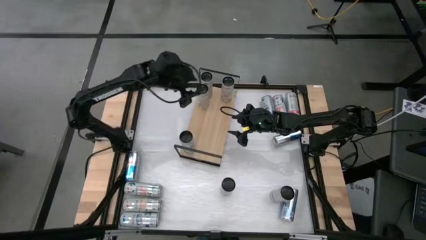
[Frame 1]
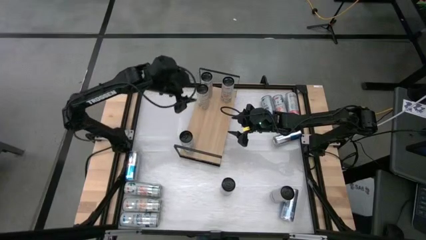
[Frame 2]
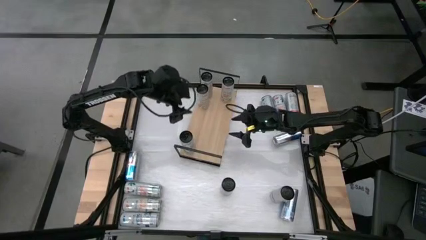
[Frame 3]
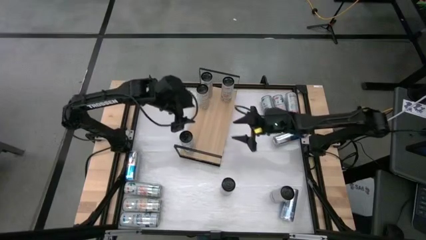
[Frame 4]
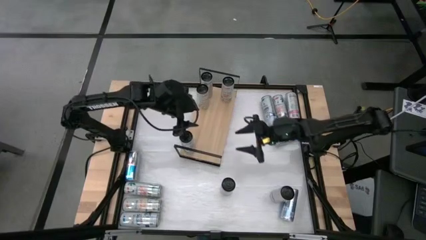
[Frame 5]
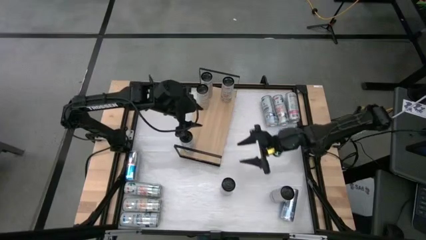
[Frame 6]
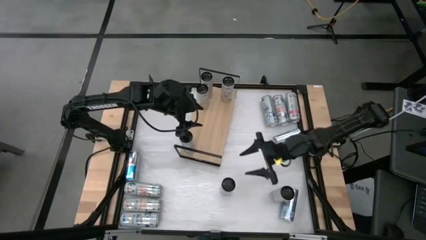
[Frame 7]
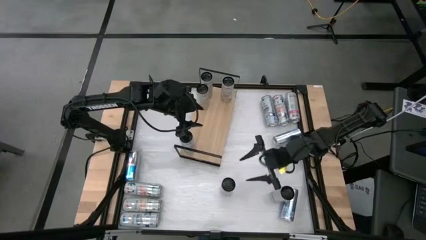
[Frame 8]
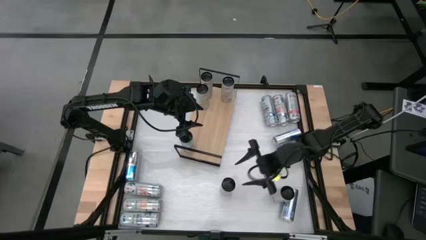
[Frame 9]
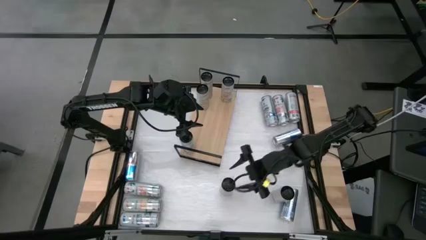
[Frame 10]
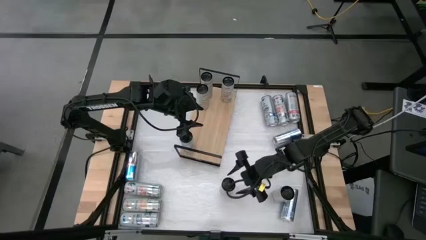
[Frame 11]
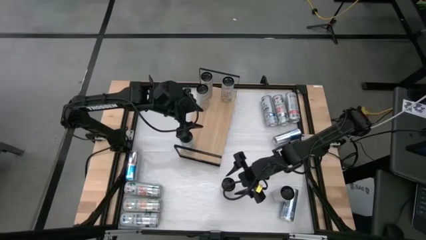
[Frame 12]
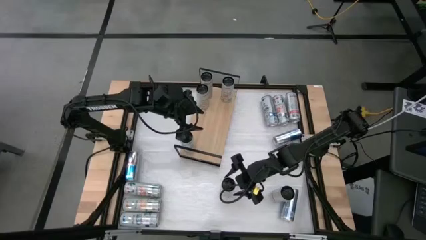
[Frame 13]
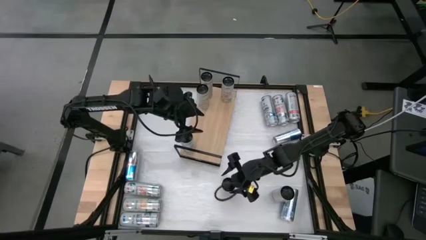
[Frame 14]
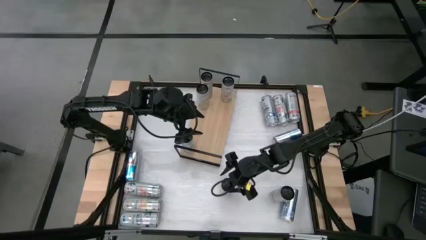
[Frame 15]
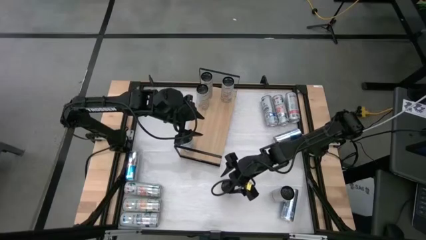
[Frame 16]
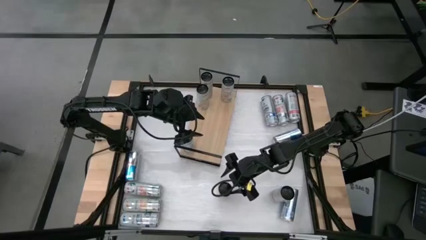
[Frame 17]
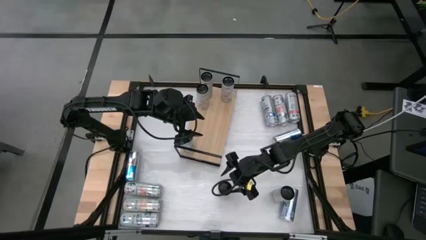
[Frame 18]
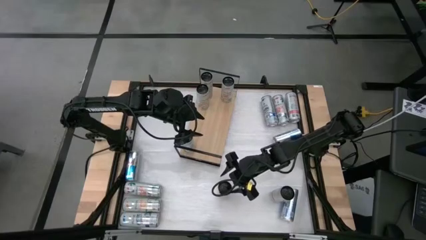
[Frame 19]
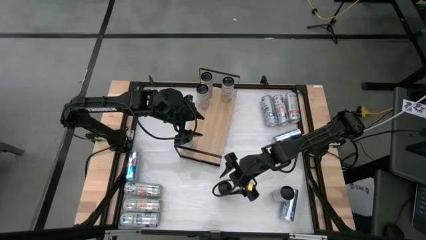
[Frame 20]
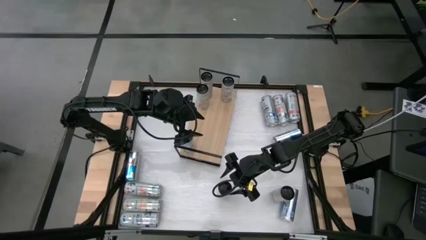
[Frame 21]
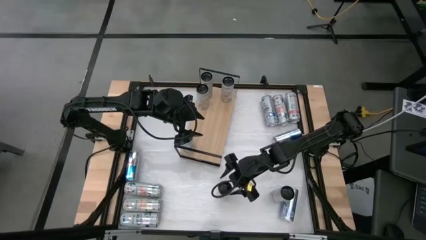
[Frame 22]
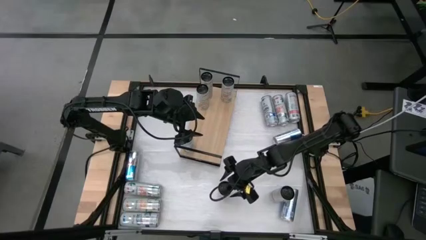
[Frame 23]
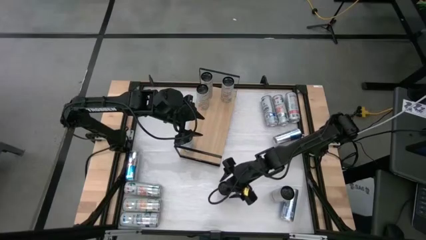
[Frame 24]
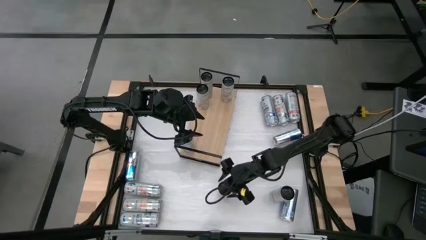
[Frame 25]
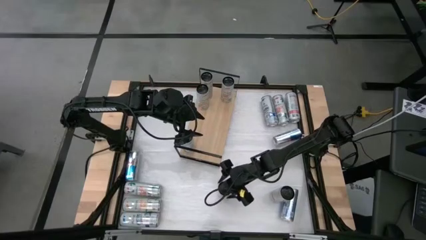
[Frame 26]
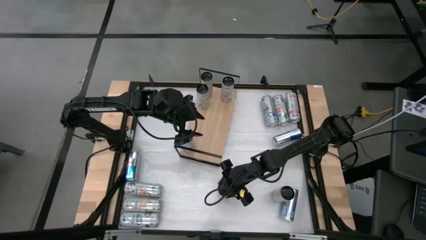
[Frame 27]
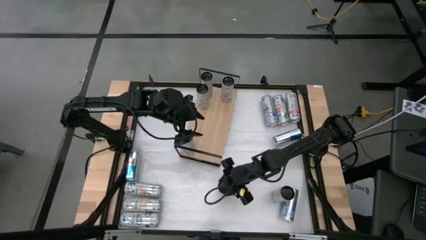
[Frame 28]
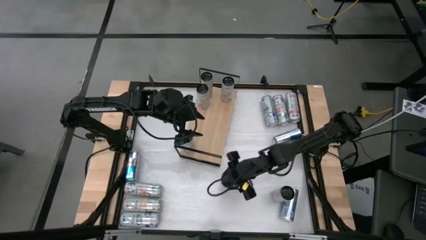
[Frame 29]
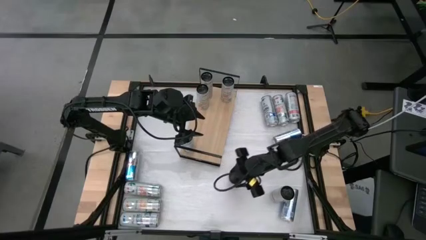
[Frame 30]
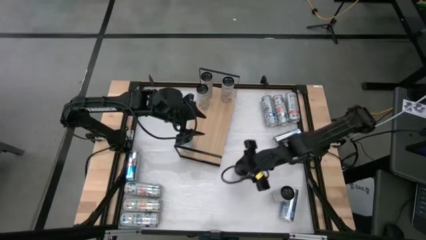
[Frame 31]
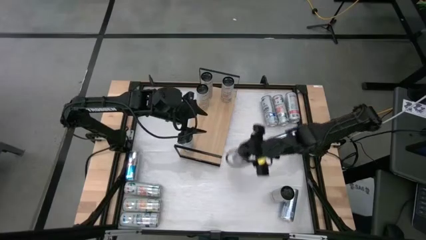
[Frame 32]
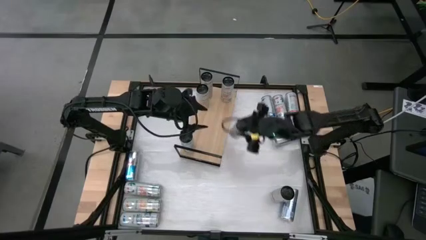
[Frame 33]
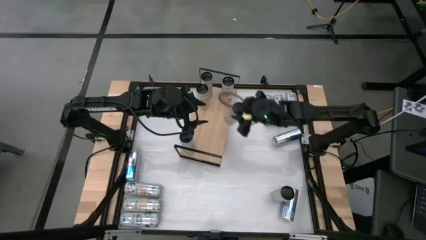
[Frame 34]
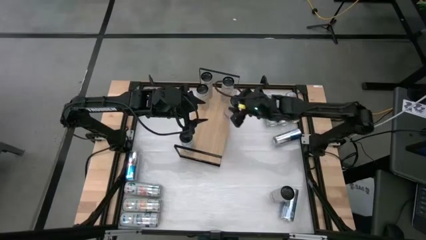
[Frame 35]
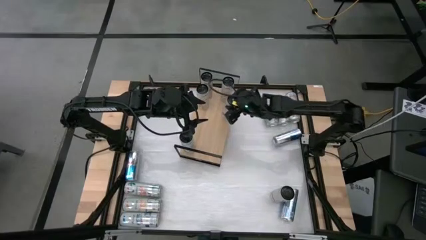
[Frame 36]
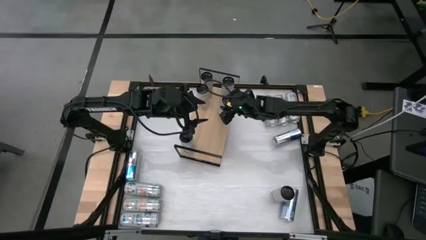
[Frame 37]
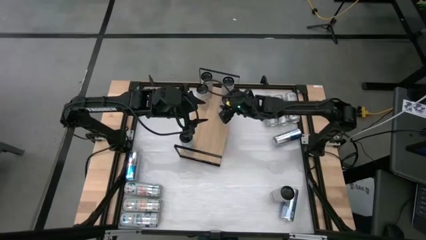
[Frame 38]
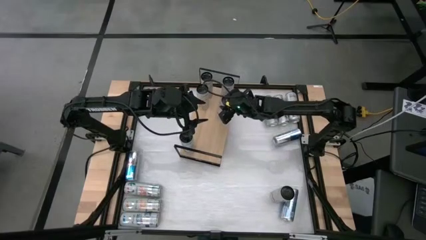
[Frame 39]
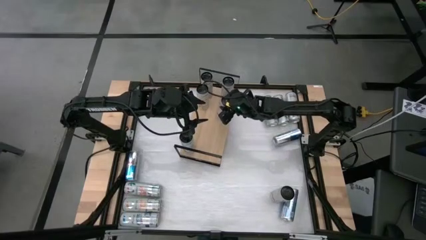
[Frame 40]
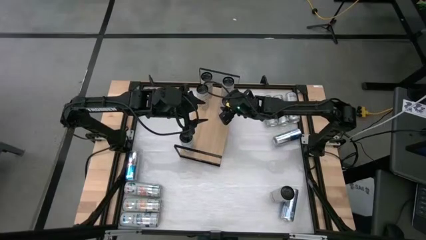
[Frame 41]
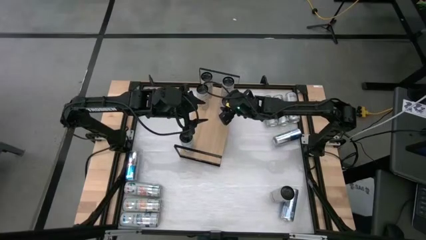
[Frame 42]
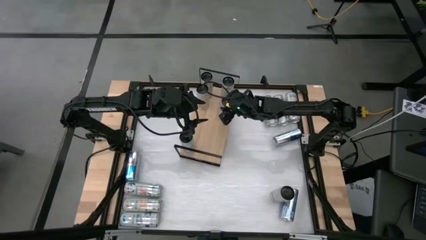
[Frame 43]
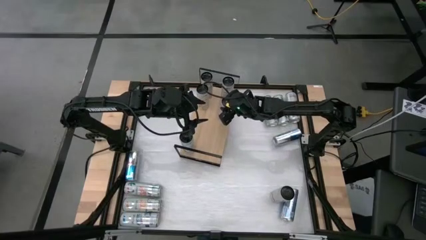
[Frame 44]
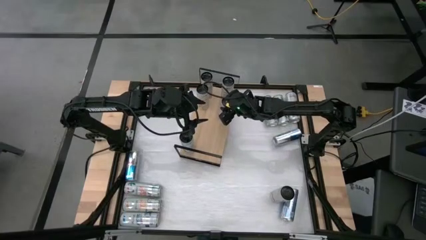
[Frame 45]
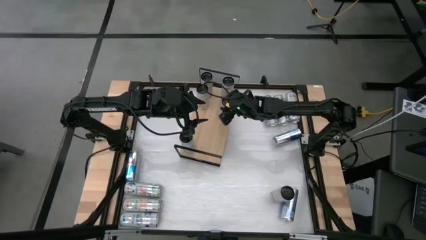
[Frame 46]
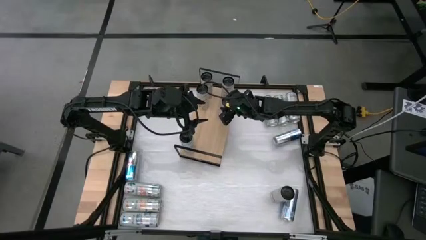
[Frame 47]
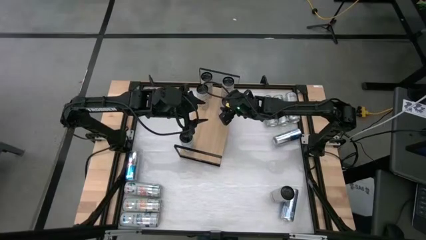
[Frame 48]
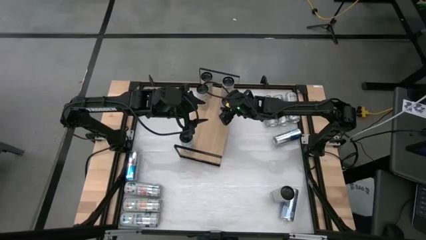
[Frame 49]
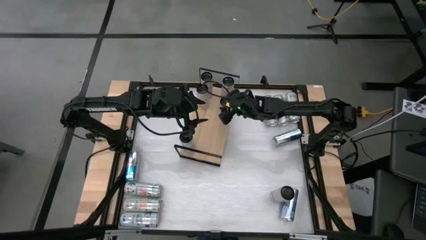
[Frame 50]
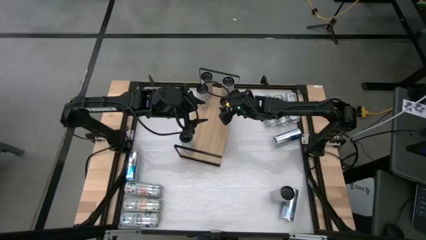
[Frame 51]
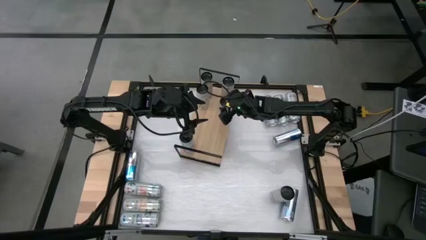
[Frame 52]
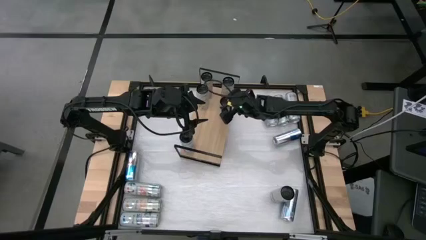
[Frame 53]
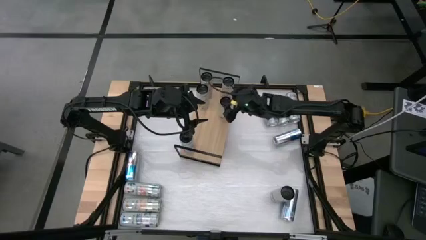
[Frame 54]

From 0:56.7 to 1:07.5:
Task: Place canned beverage on shelf
Put the bottom middle pink soda can on the shelf aligned with the other pink soda can

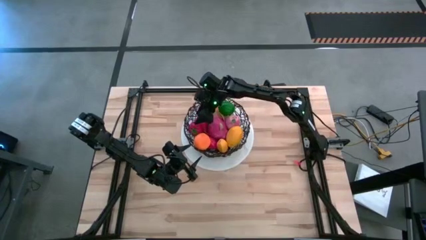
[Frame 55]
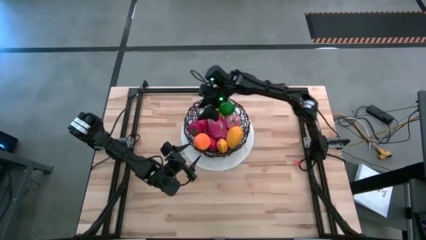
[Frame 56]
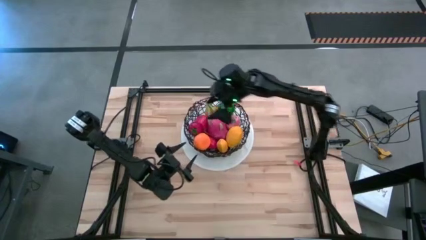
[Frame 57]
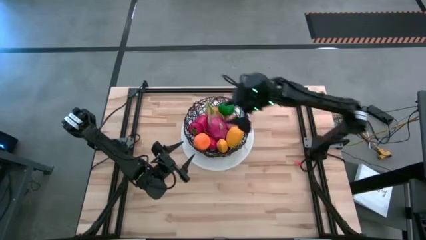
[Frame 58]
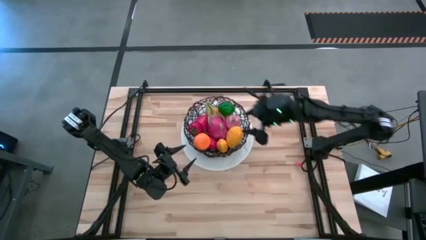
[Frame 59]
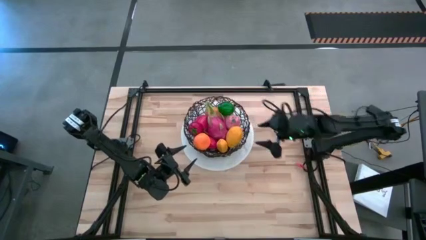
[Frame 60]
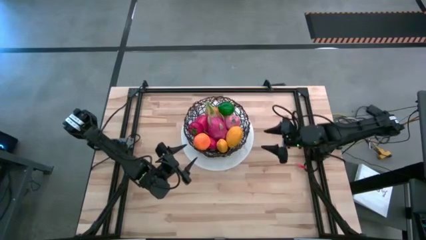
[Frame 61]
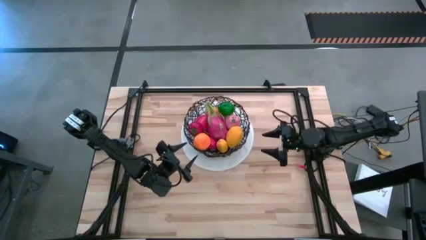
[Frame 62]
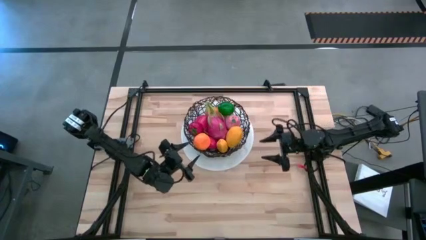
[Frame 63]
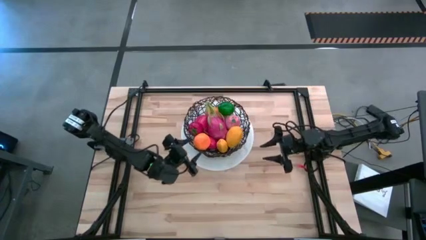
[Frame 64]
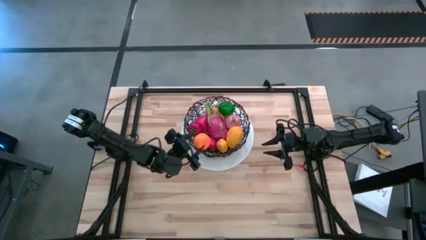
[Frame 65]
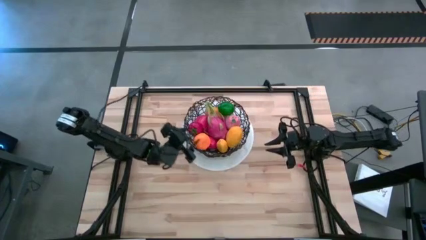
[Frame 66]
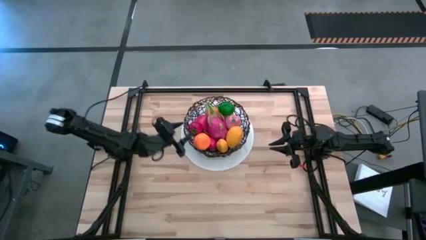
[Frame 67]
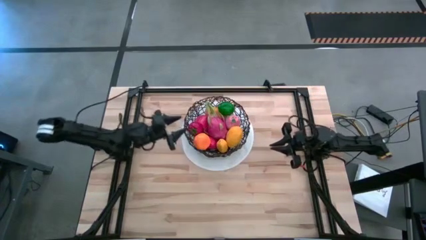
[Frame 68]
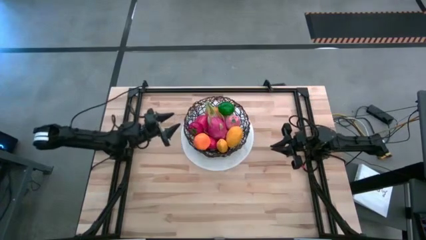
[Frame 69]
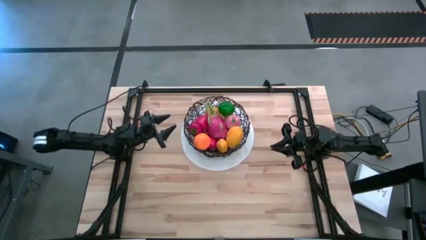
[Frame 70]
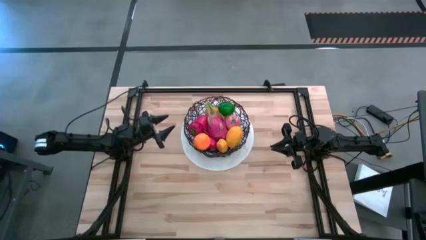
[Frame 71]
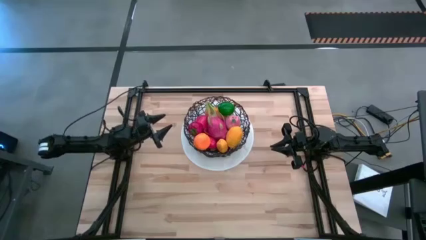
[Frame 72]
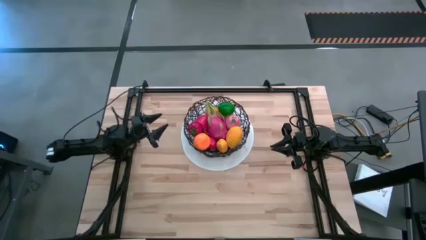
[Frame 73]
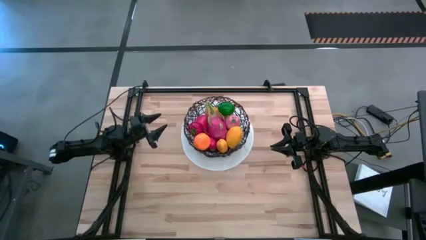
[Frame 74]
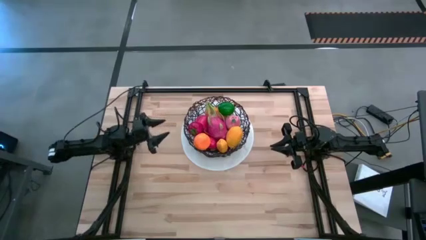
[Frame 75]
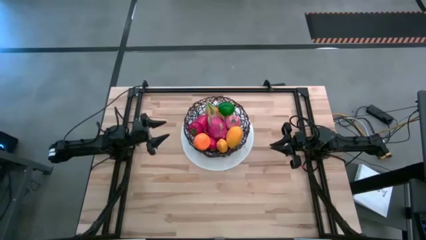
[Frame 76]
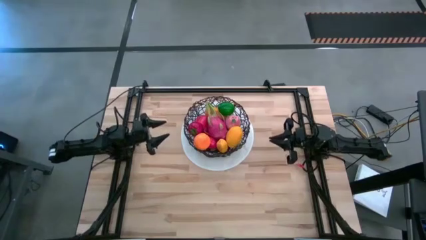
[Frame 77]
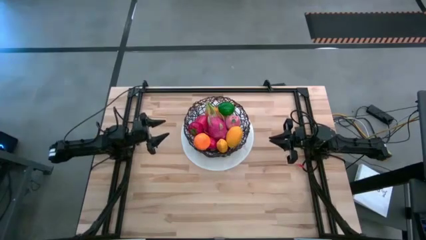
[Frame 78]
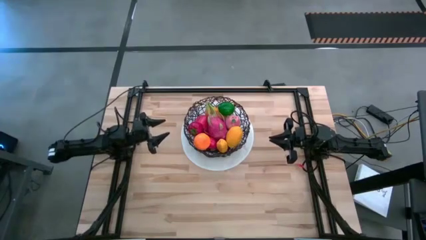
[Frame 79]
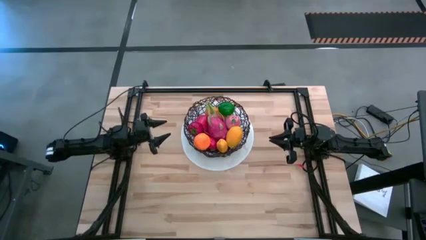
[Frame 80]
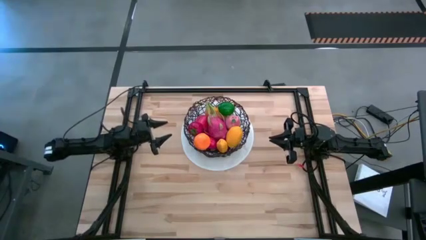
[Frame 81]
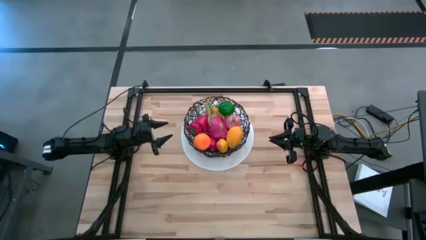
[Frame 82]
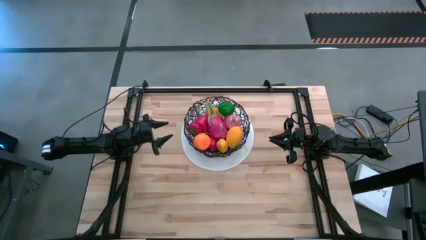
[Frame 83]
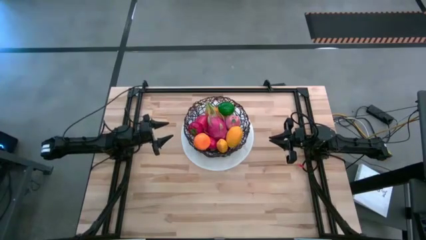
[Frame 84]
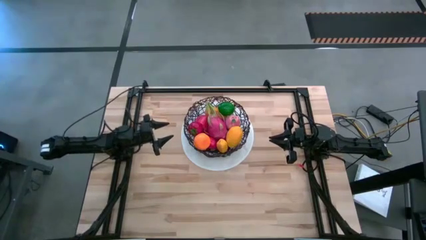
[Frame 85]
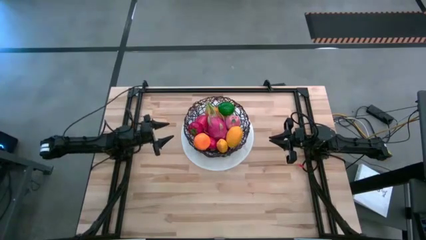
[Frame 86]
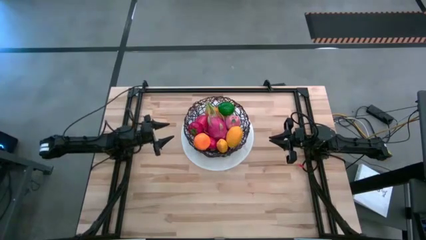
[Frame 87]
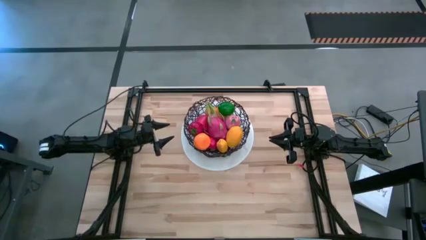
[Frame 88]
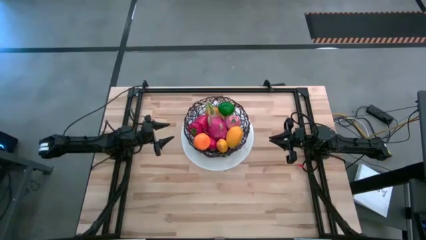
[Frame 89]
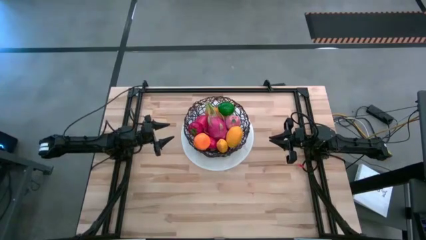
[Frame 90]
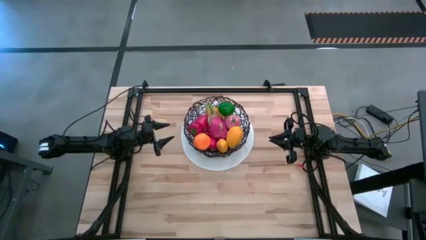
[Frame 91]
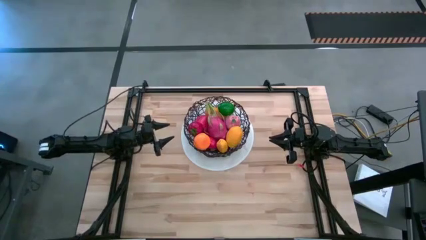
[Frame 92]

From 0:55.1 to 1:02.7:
Task: Build produce basket
Return to Home Position
